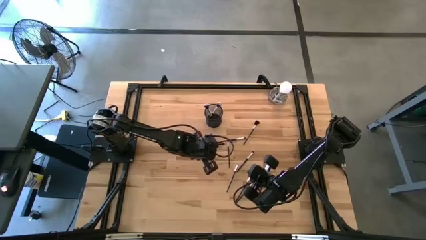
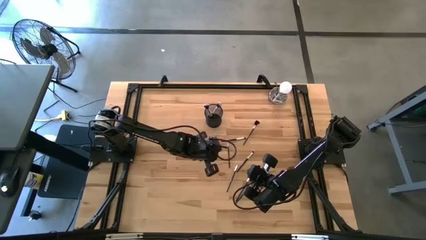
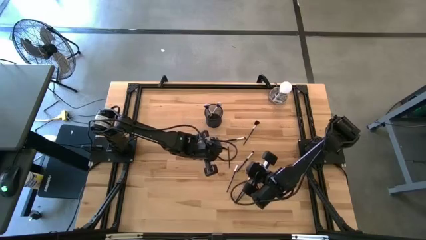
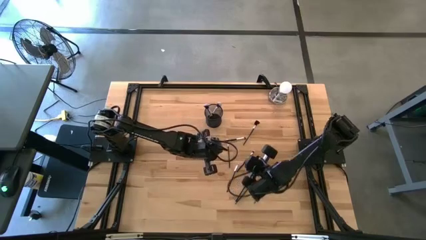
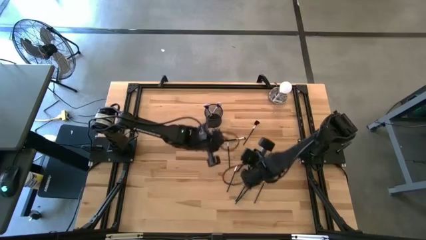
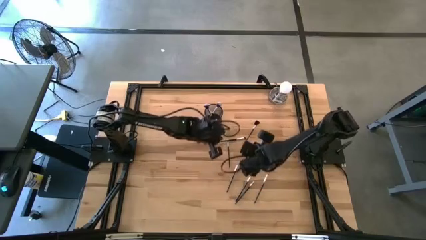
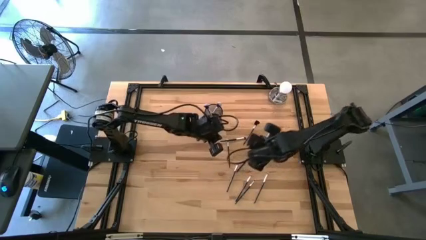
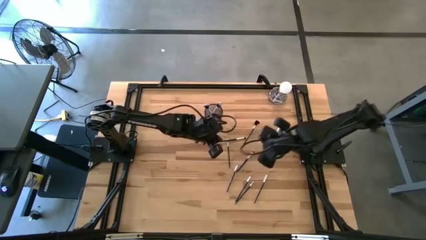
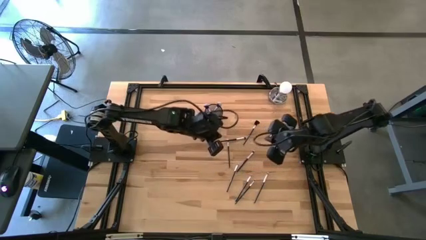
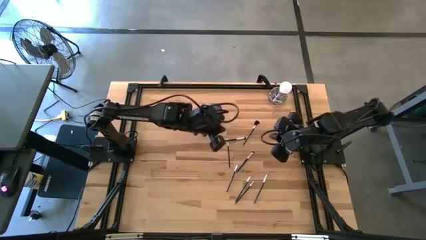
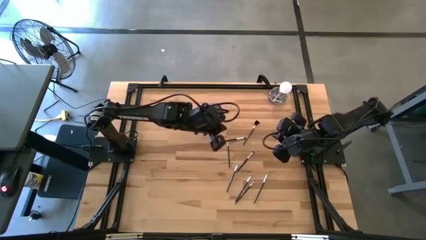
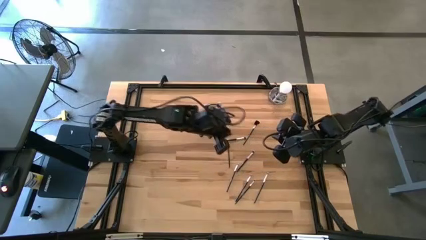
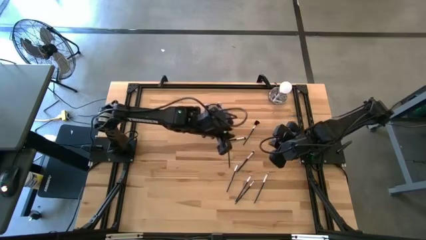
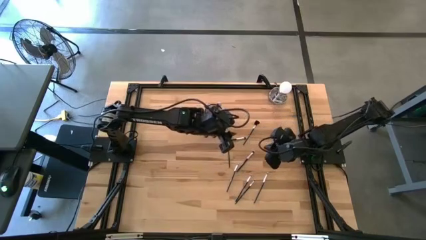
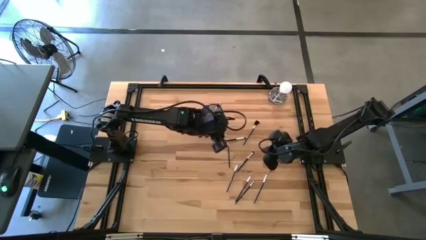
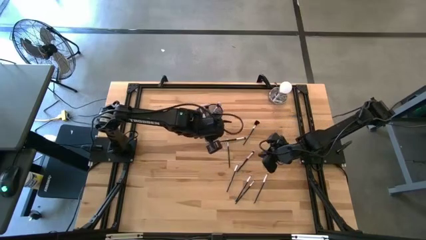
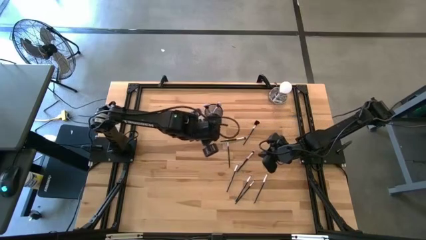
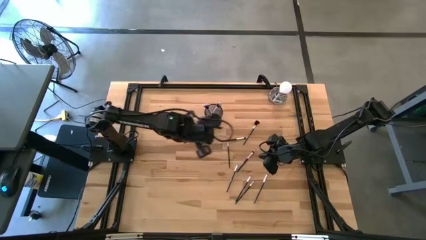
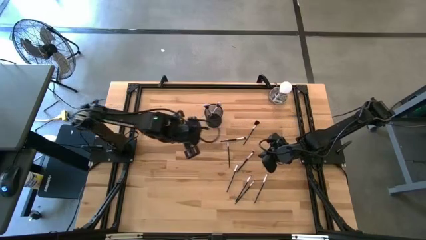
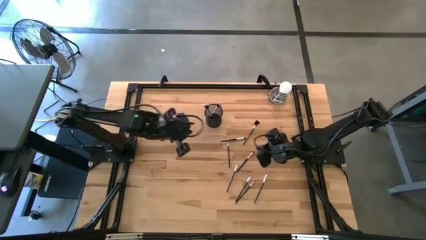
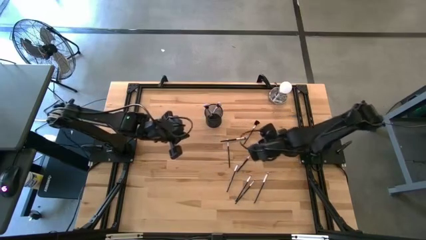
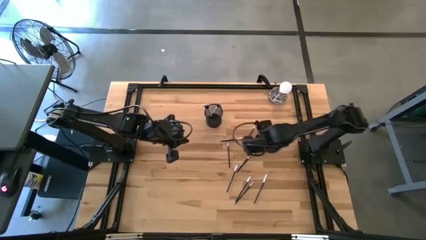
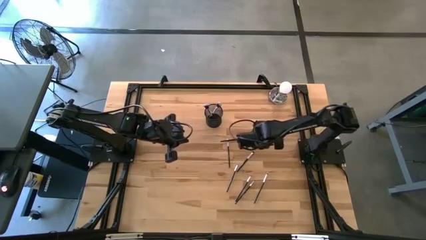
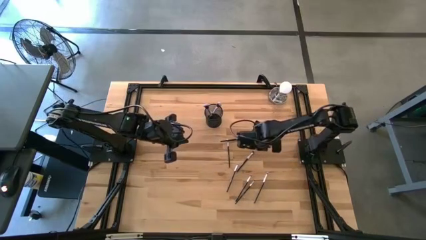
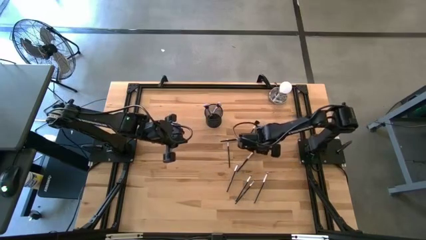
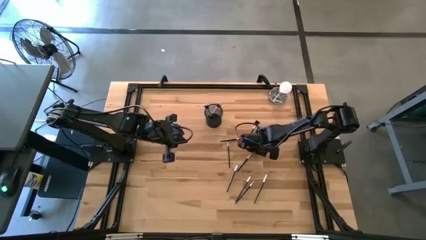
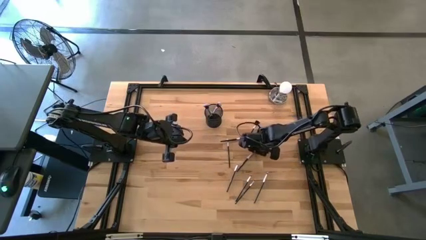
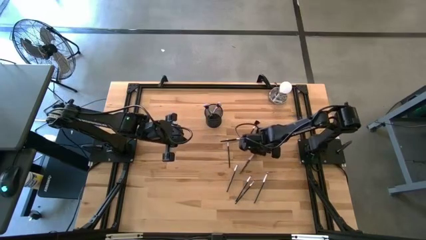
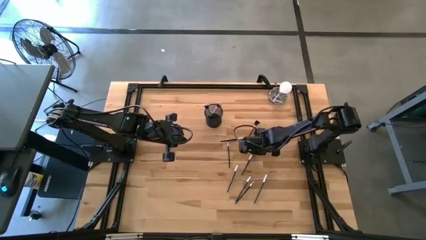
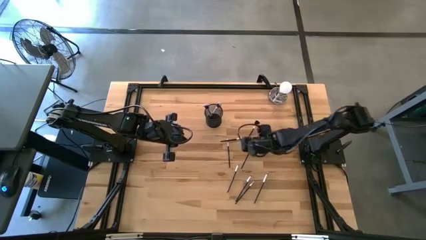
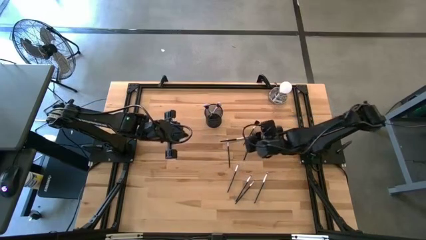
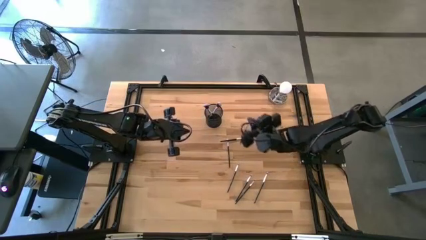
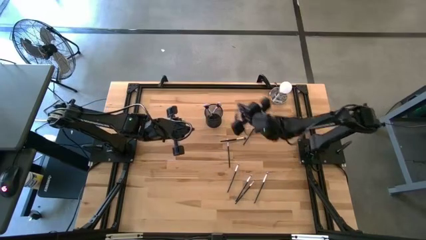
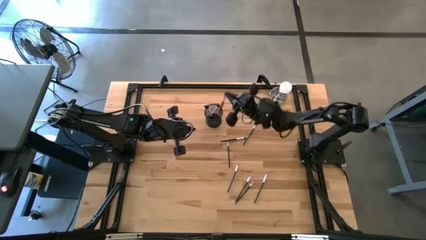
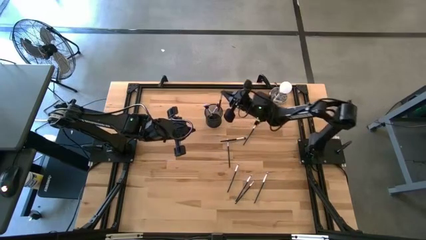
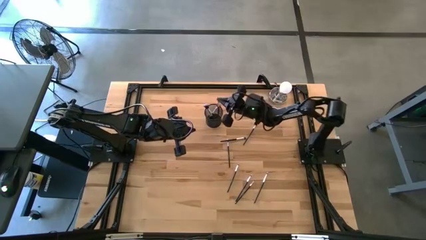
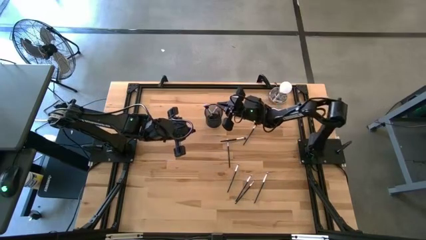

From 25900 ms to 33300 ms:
Task: Pick & Place Makeup Brushes
Put the small white make-up brush into the black container

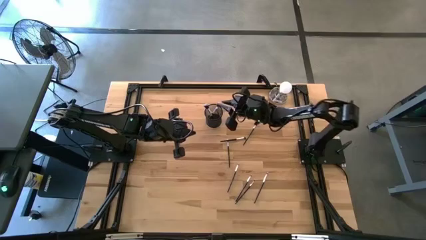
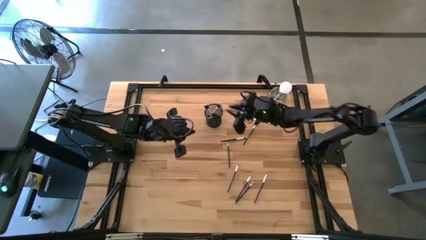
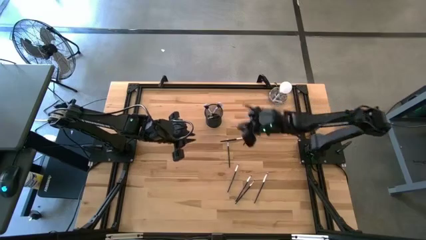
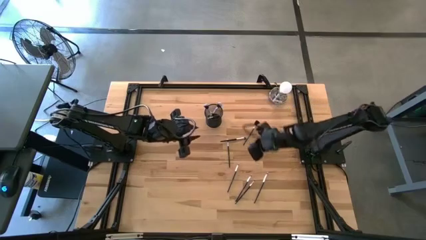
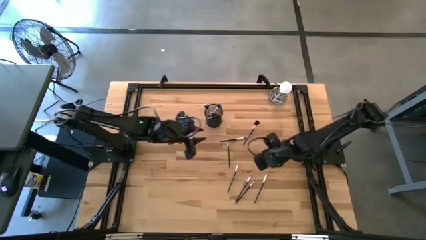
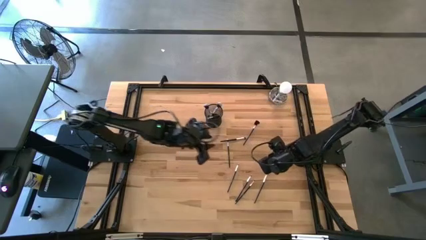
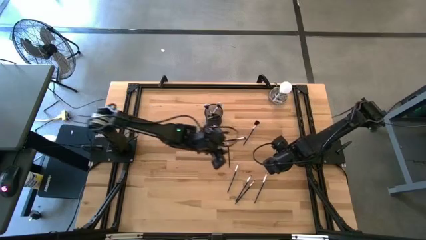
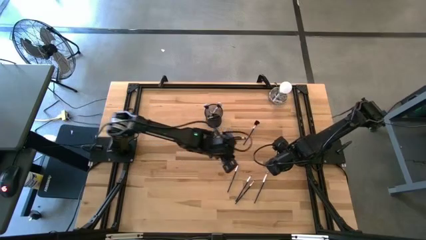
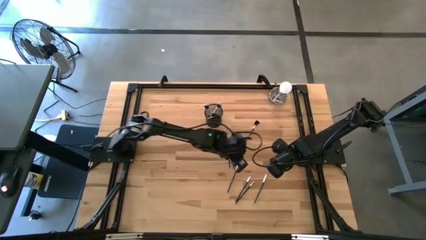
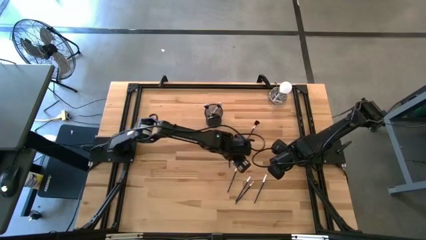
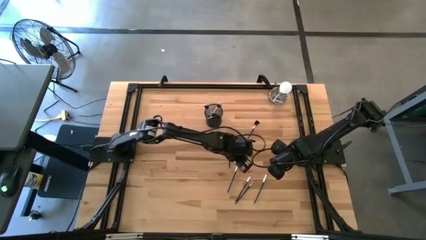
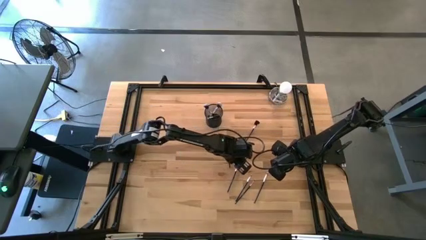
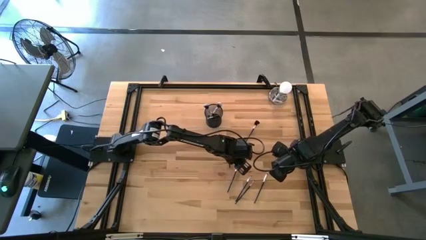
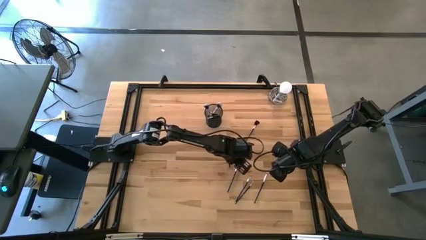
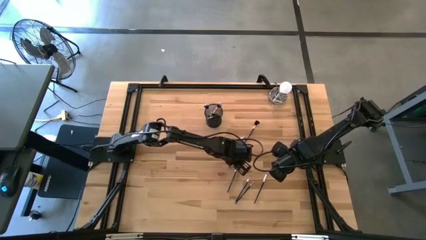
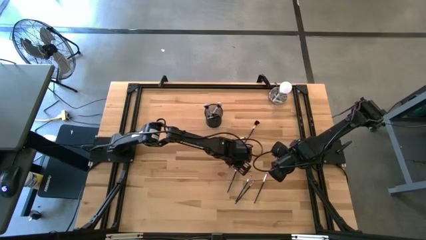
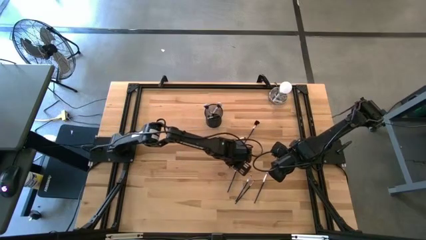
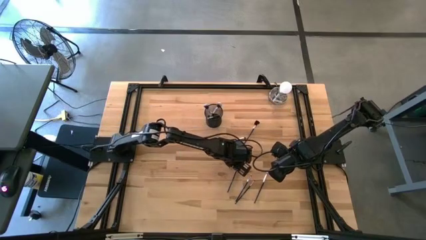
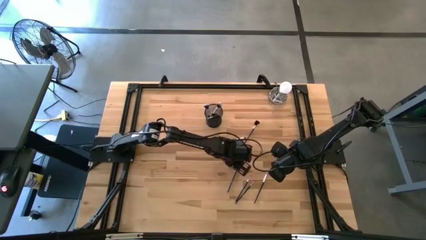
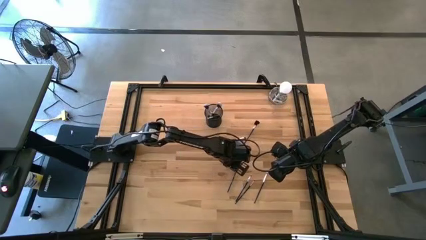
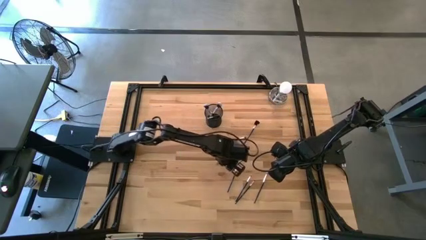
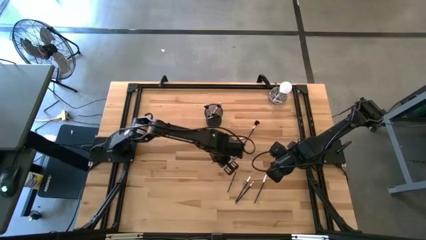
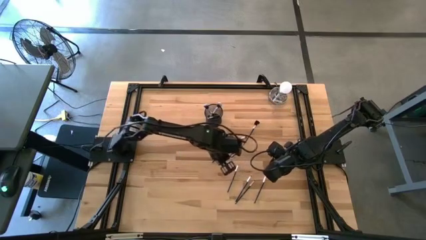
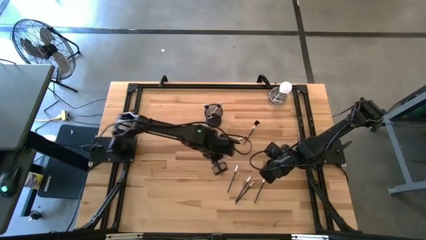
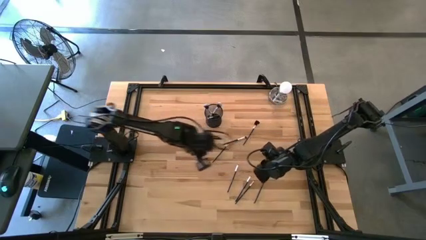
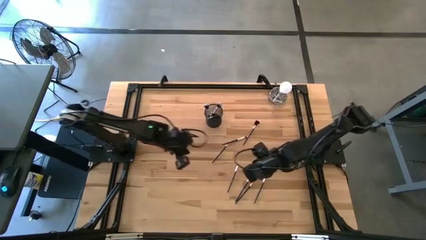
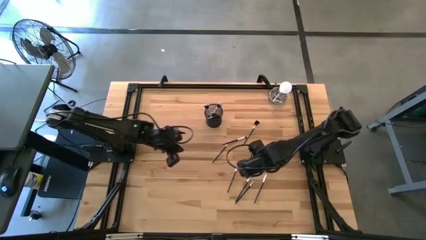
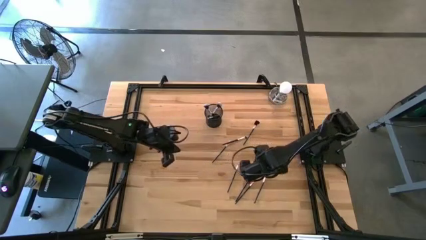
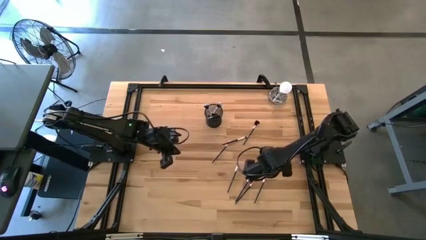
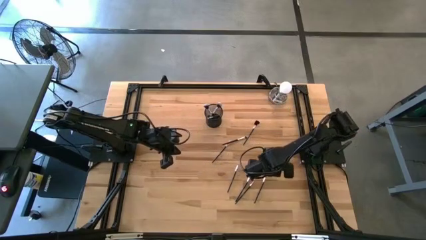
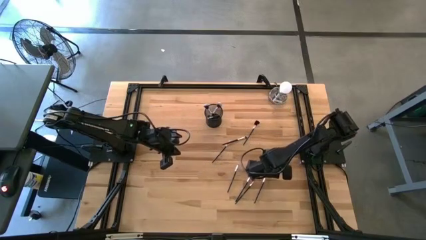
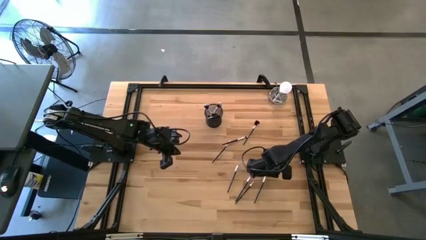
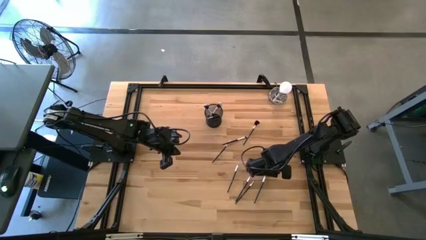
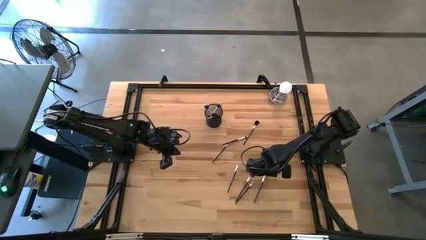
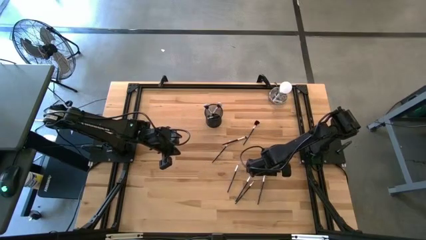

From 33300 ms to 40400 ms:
Put the small white make-up brush into the black container

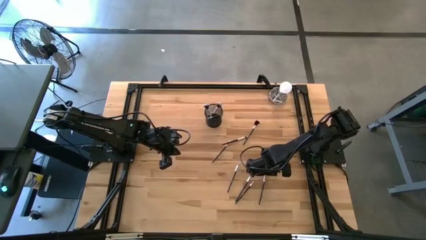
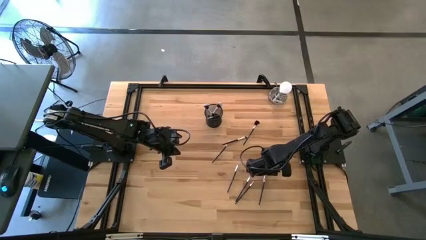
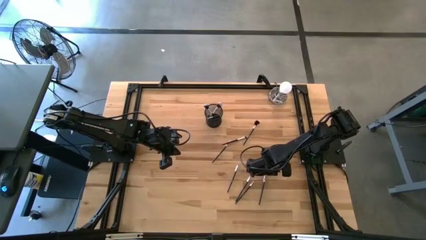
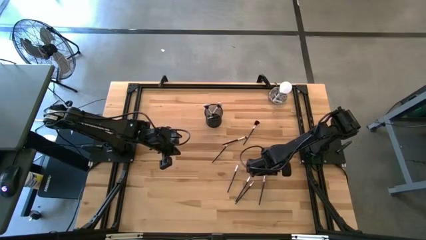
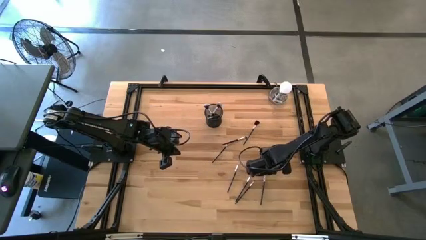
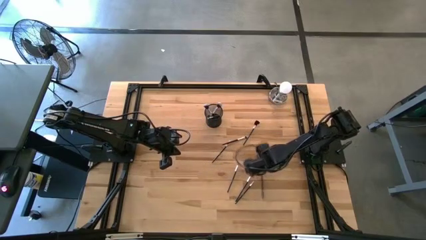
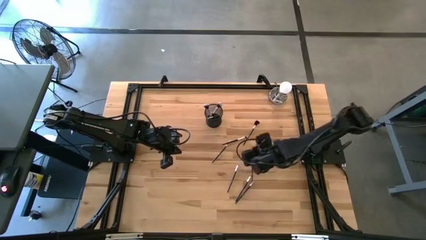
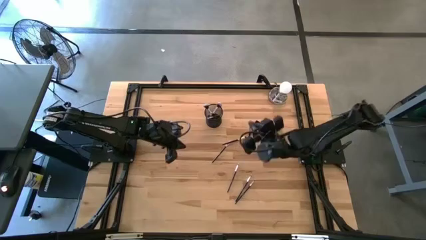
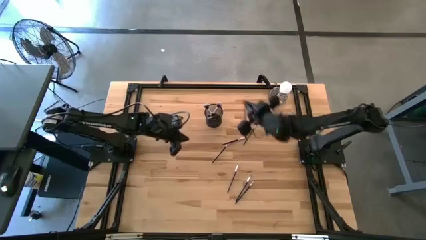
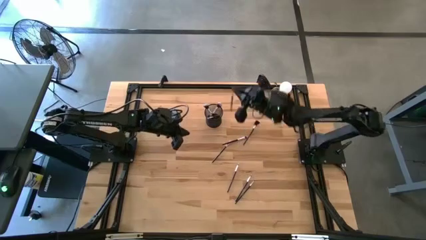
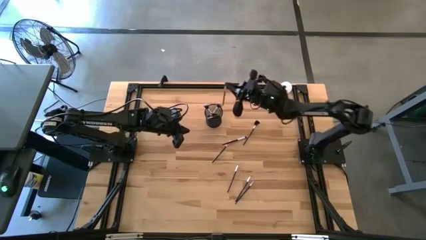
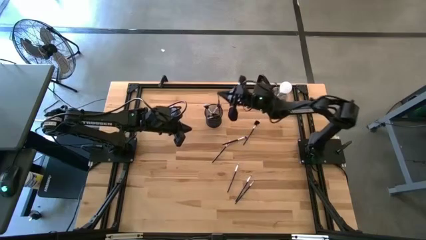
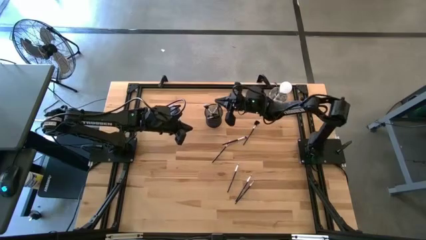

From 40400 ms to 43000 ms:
Put the small white make-up brush into the black container
